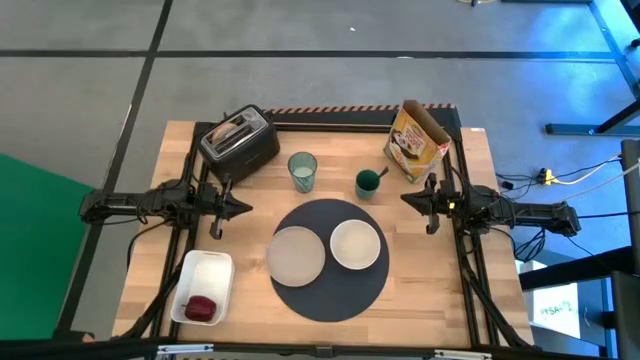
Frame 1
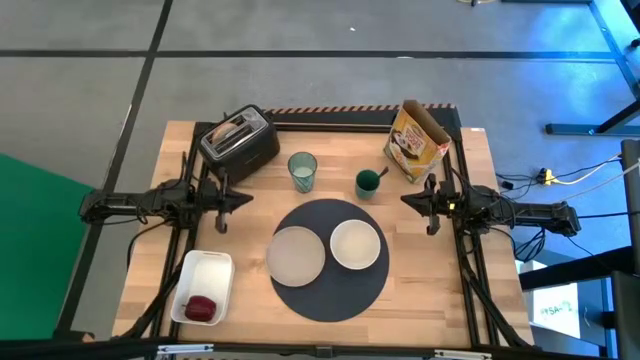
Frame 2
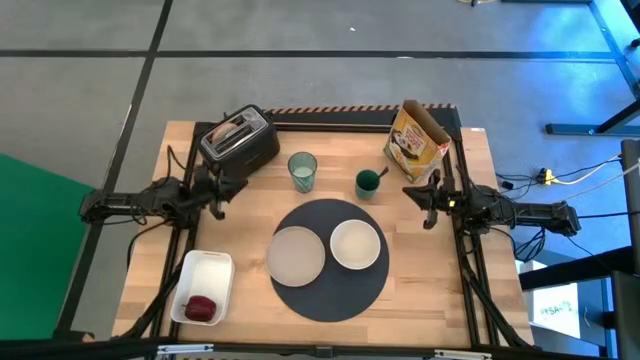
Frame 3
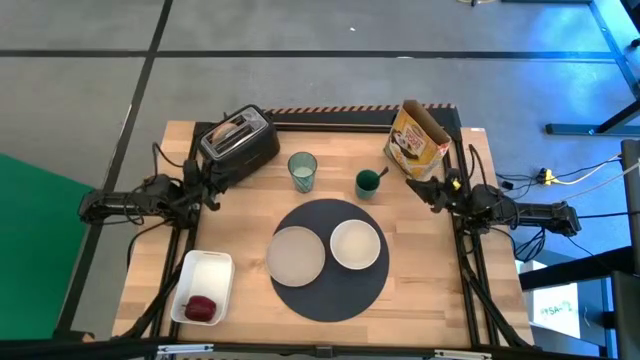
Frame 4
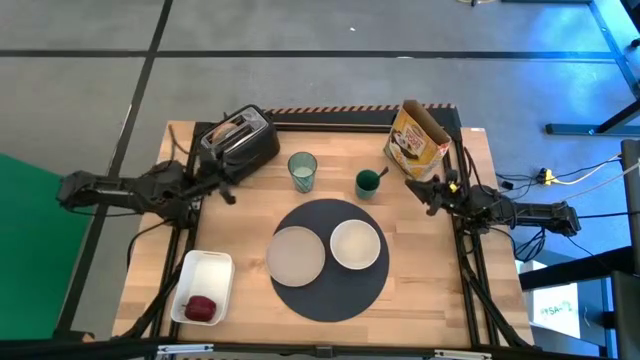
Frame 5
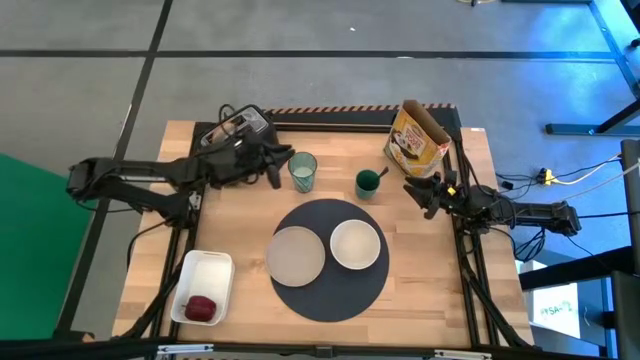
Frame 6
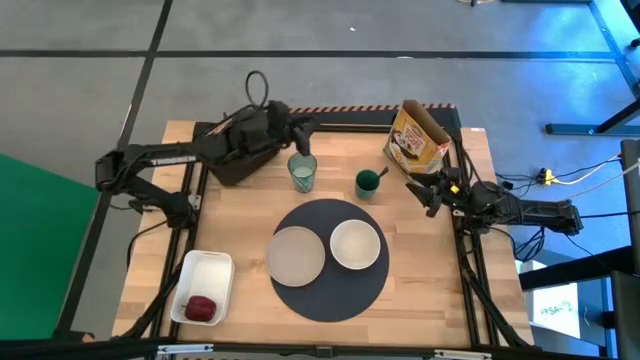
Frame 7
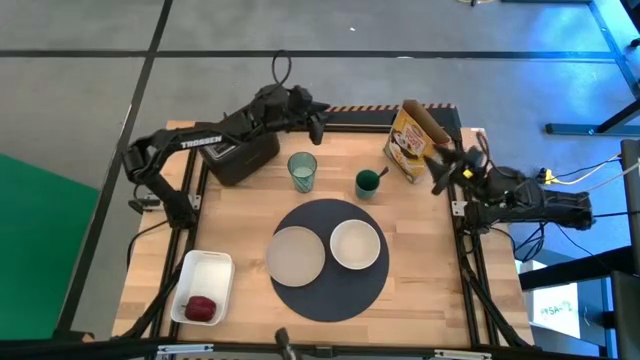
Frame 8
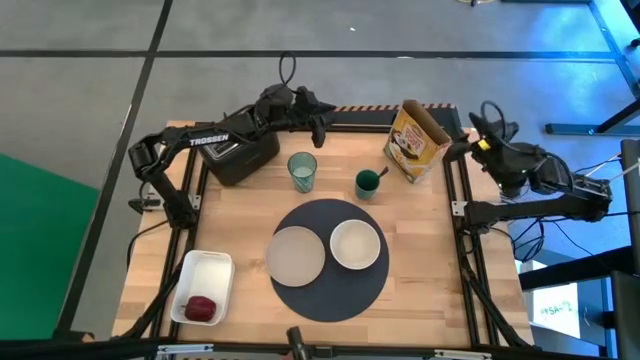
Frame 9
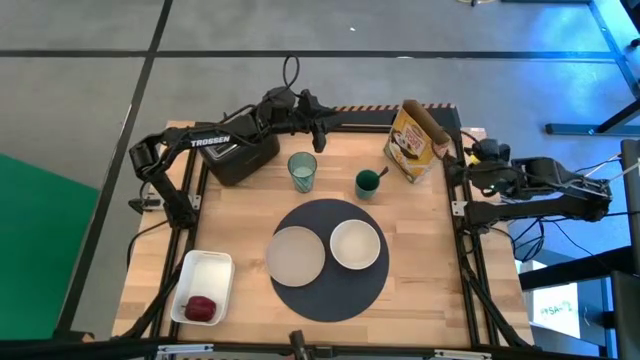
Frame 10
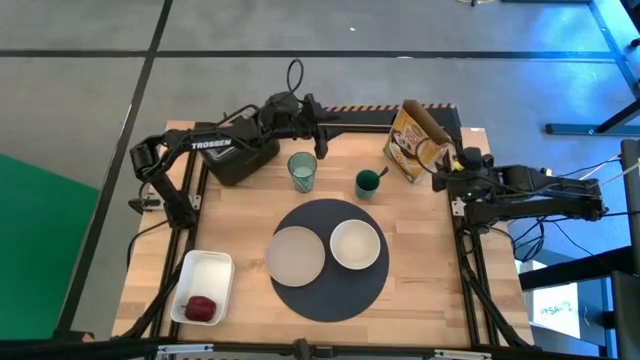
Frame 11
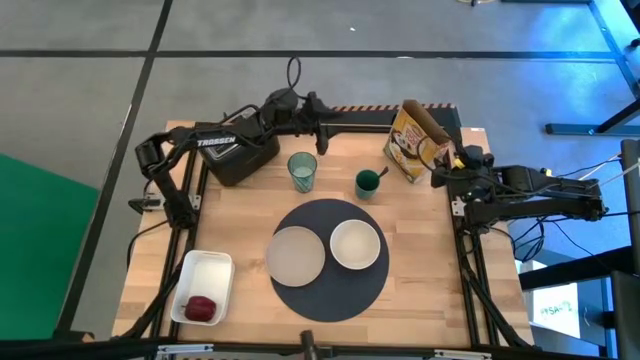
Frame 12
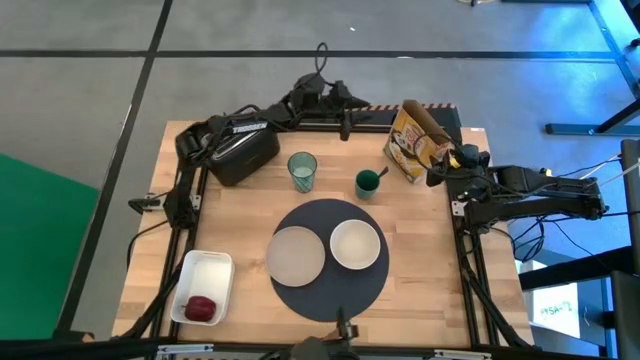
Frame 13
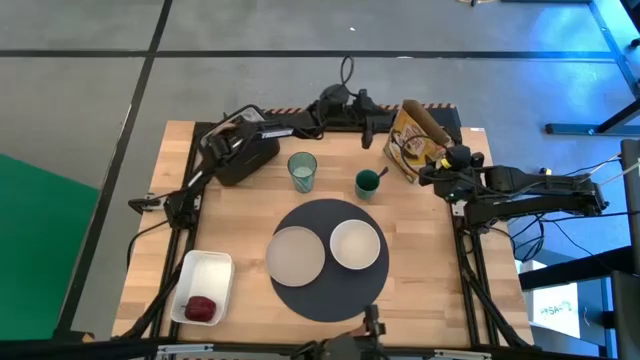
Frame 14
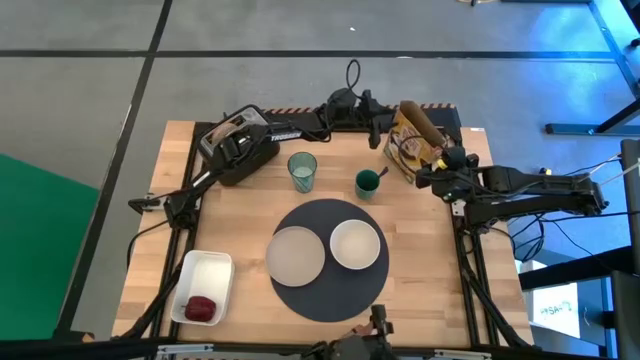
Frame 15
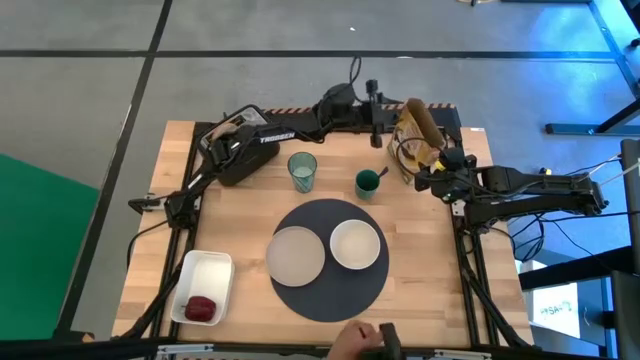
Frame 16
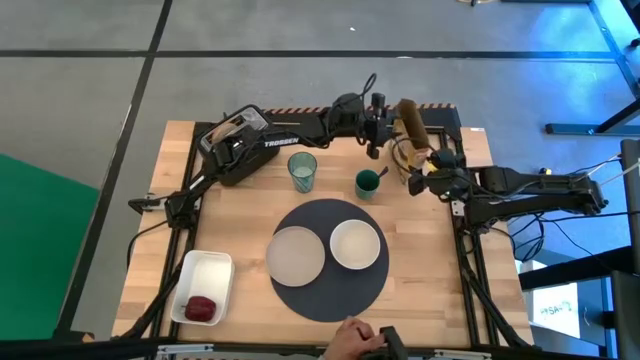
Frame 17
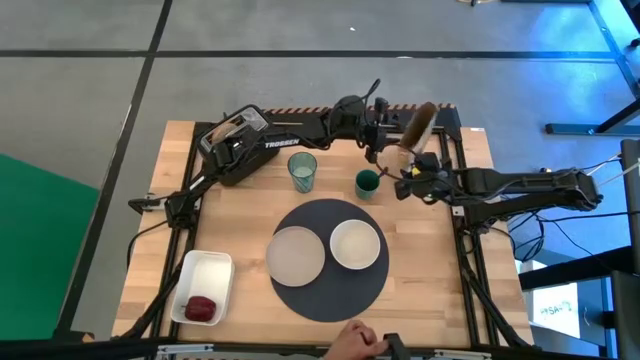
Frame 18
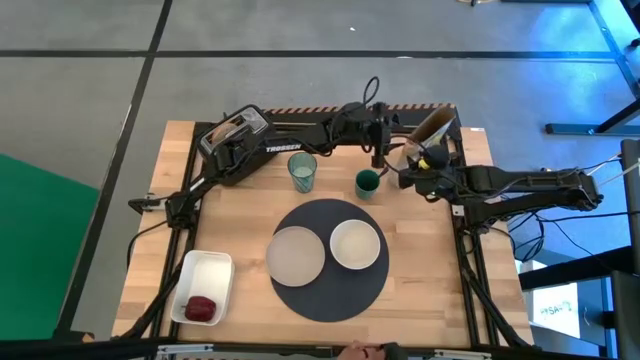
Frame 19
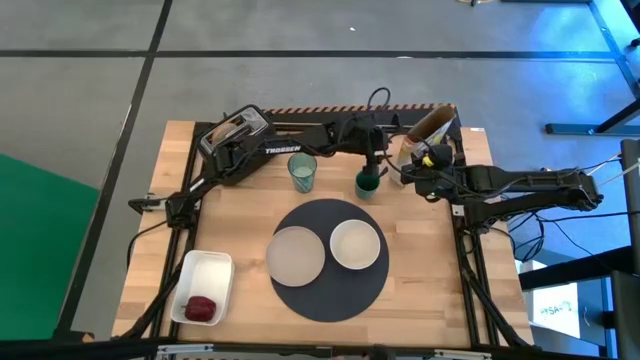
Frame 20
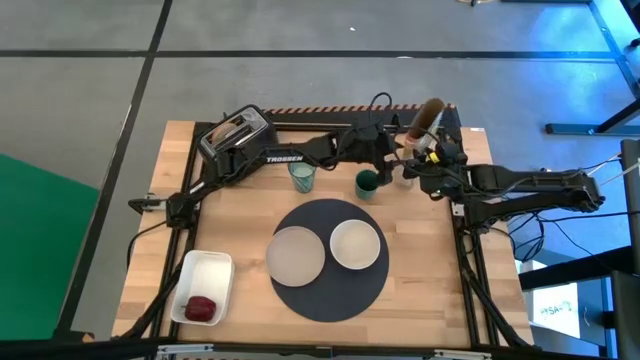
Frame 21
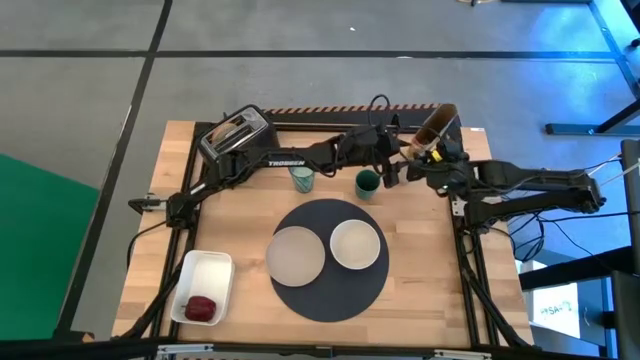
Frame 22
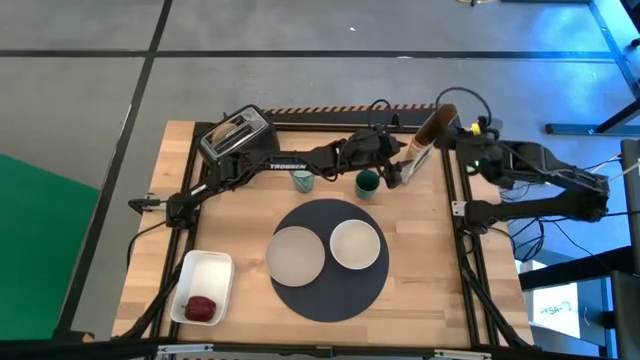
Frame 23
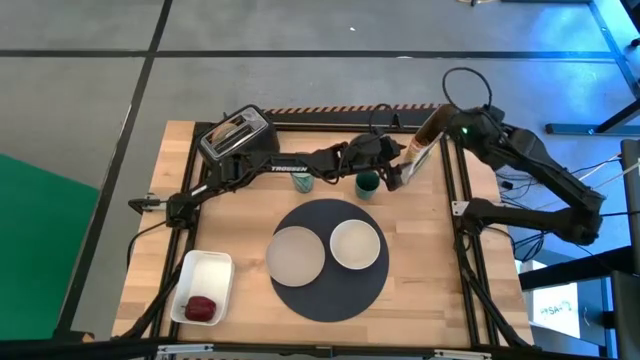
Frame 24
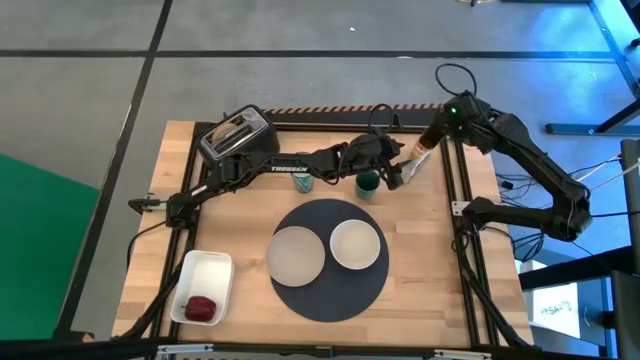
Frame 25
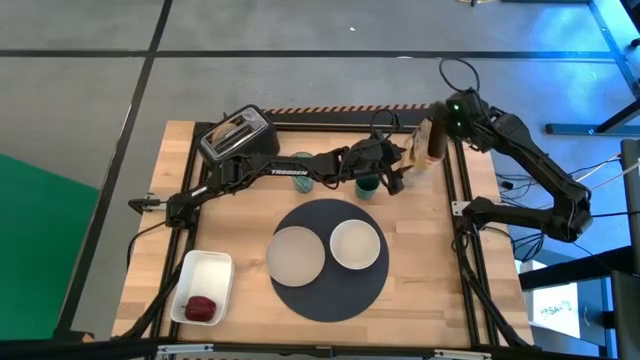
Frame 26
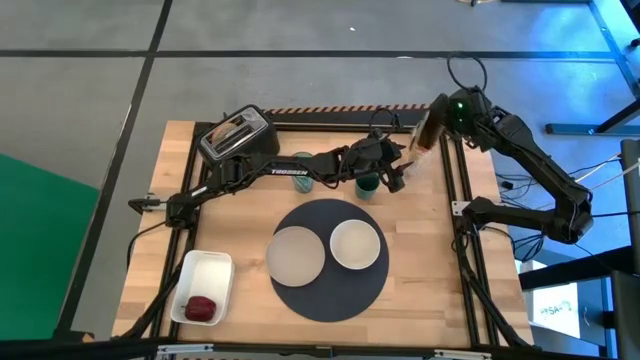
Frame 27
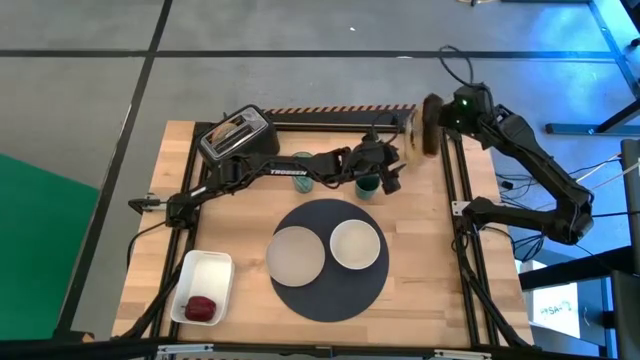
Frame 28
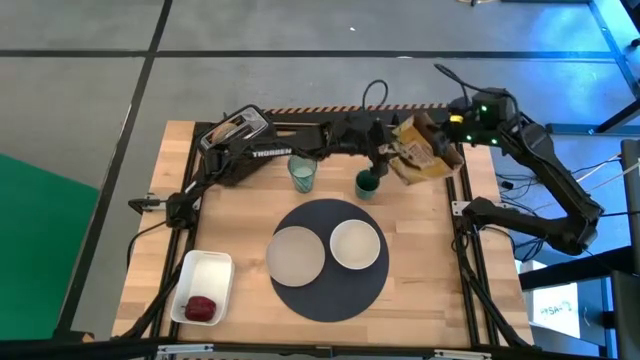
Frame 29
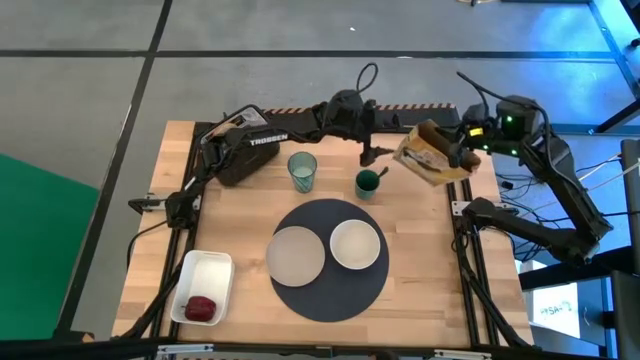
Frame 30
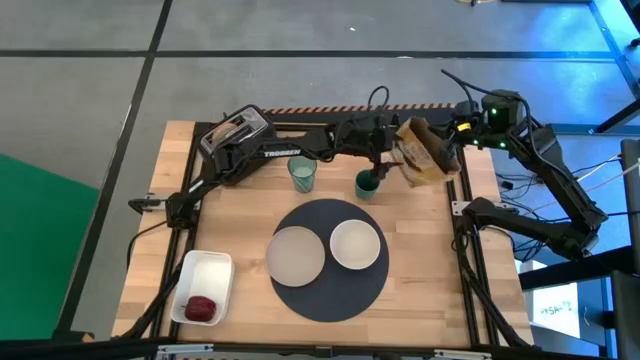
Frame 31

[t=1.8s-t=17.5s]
Task: Arrange a breakfast setting
Pour the cereals from the cereal box into the white bowl
